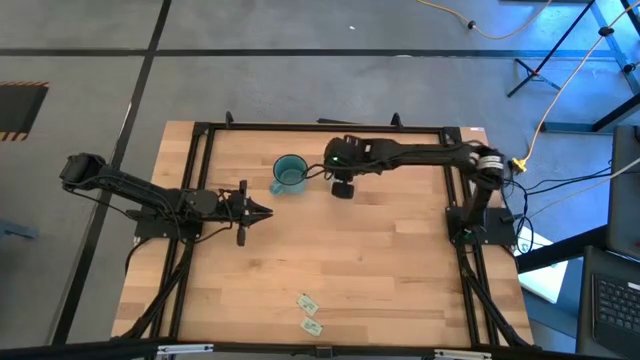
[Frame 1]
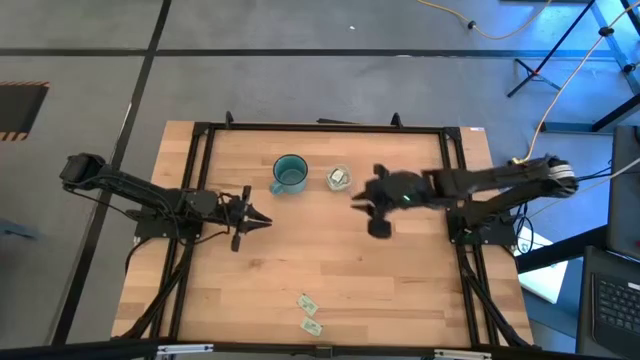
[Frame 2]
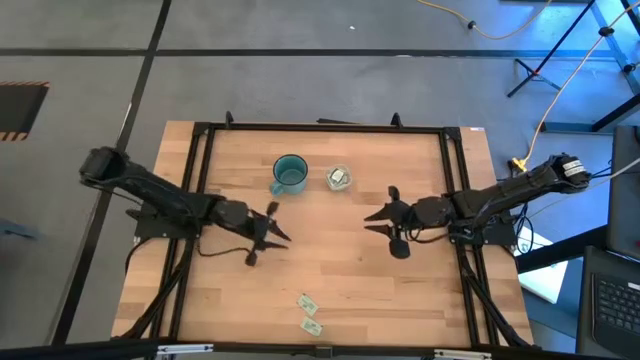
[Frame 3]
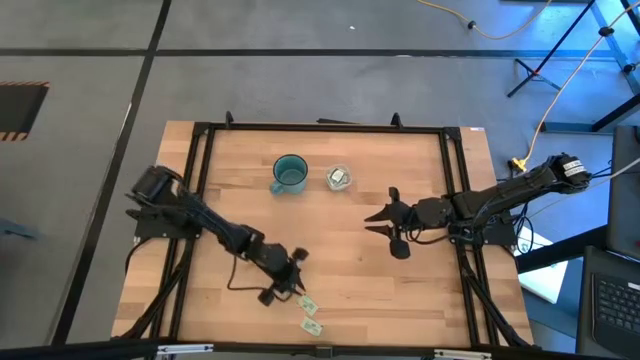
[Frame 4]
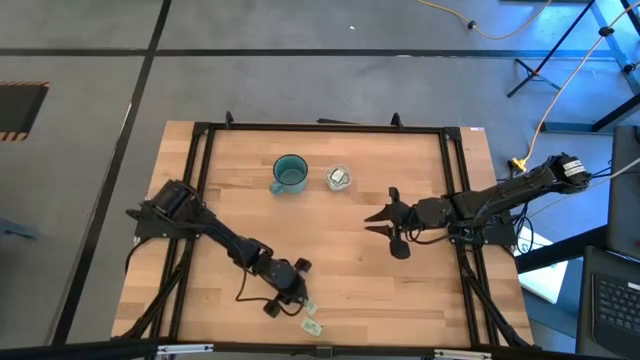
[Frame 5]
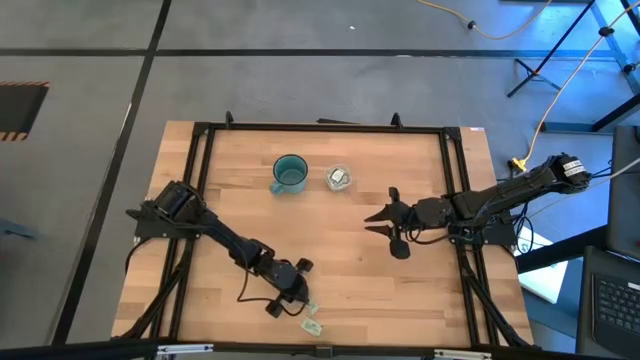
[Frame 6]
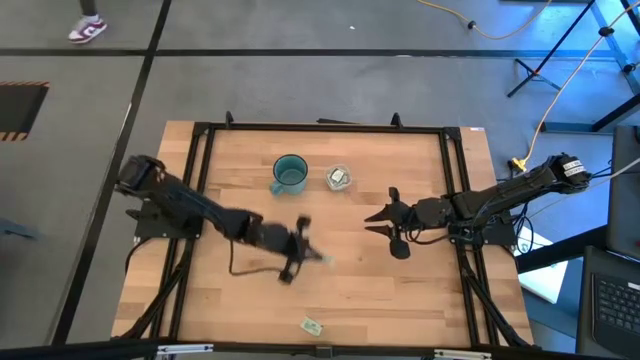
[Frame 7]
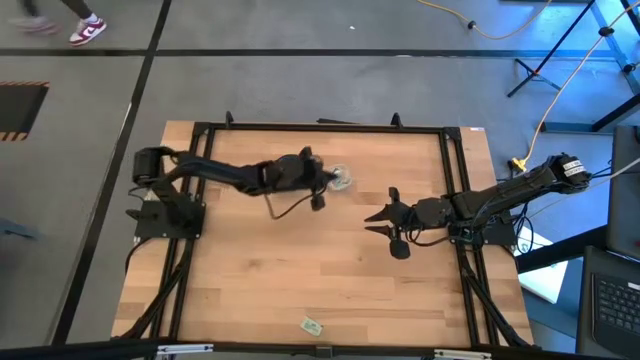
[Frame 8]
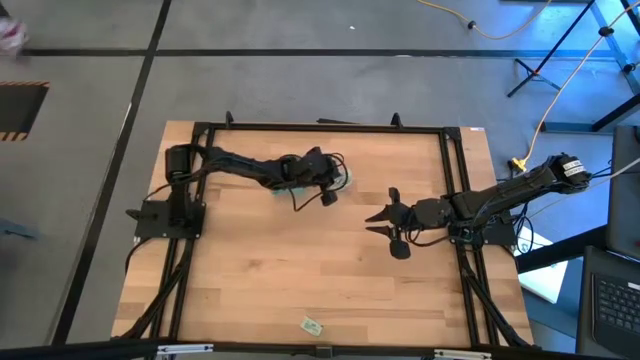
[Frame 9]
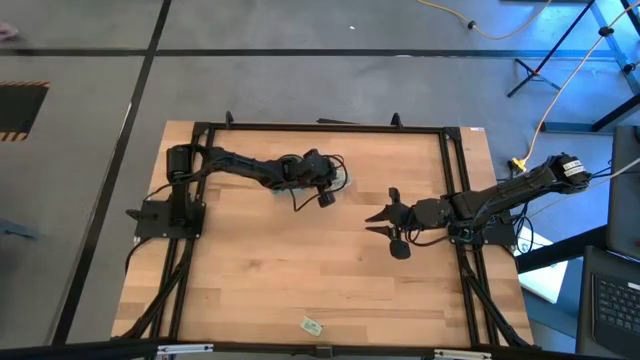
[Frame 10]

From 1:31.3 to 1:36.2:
Task: Pick and place items into bin
Put the white stevia packet into the transparent bin

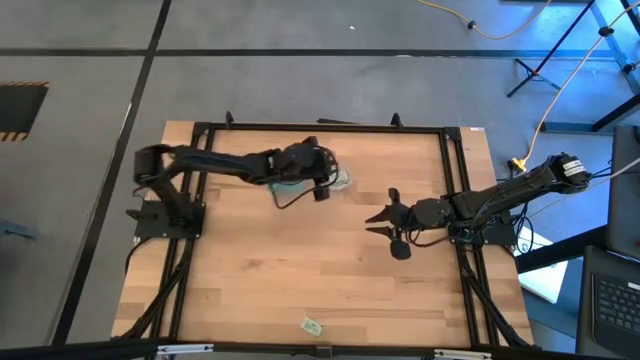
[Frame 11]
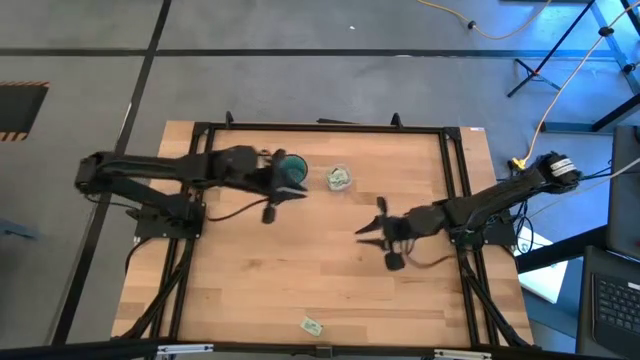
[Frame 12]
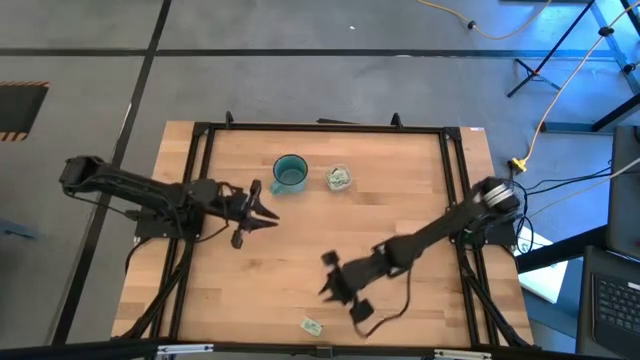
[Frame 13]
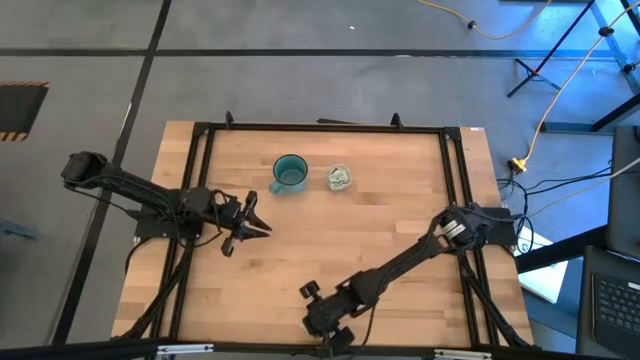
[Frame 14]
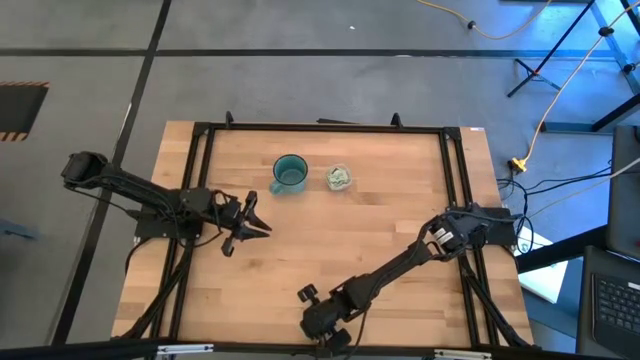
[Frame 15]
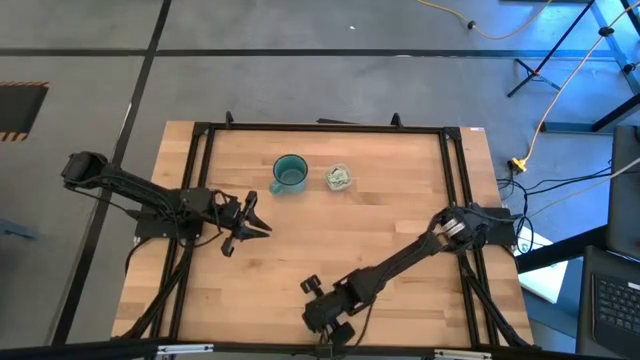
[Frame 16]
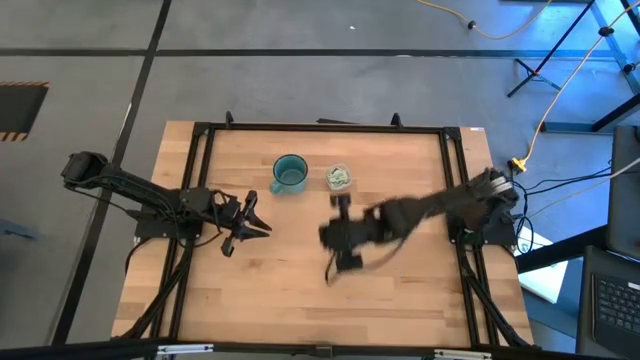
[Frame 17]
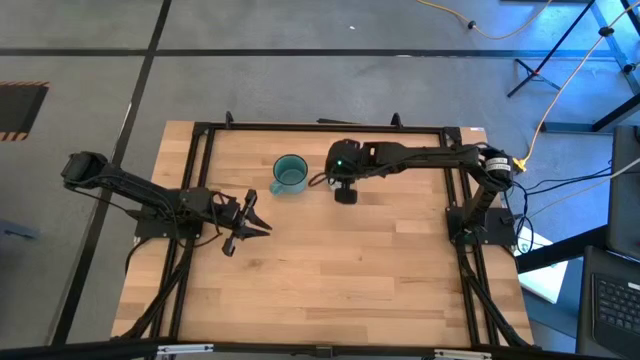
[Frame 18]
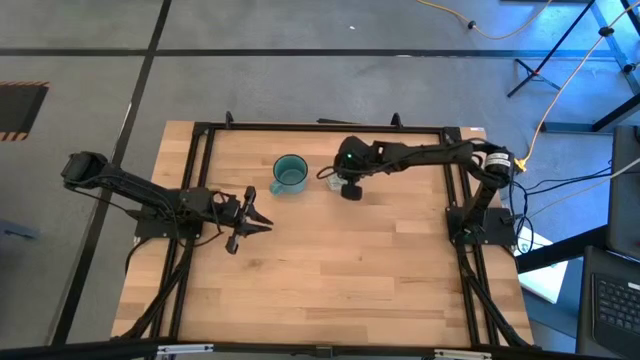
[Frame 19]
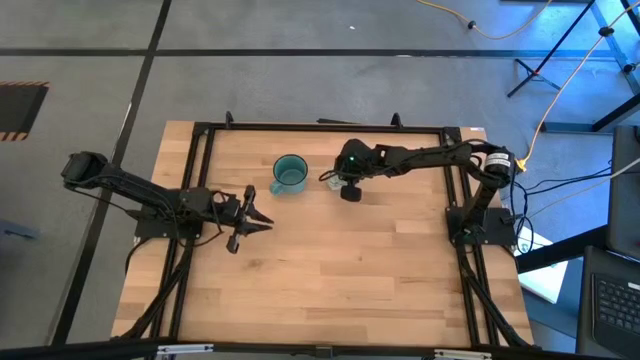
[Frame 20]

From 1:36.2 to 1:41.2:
Put the white stevia packet into the transparent bin

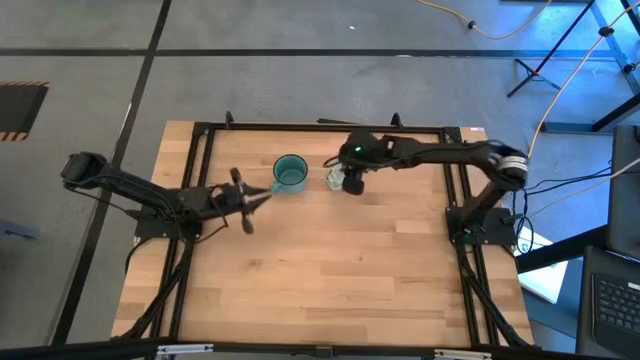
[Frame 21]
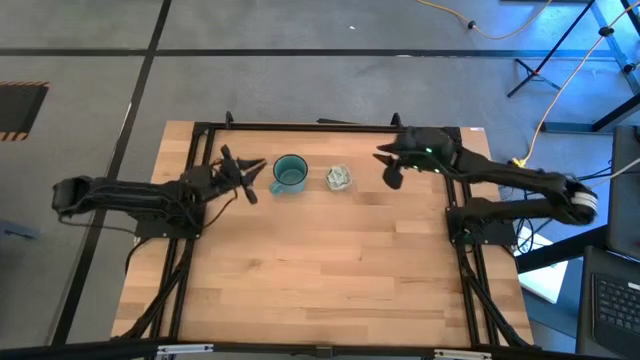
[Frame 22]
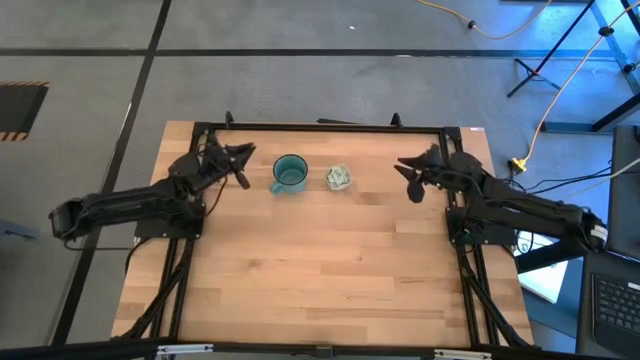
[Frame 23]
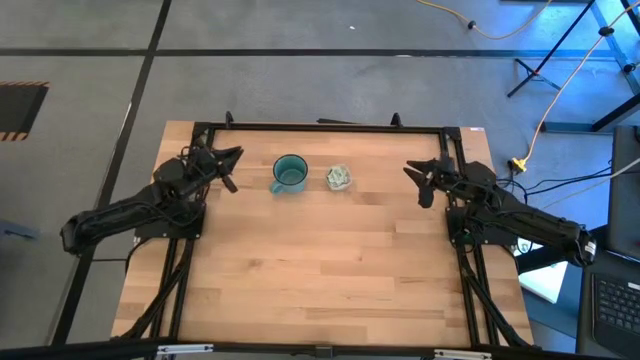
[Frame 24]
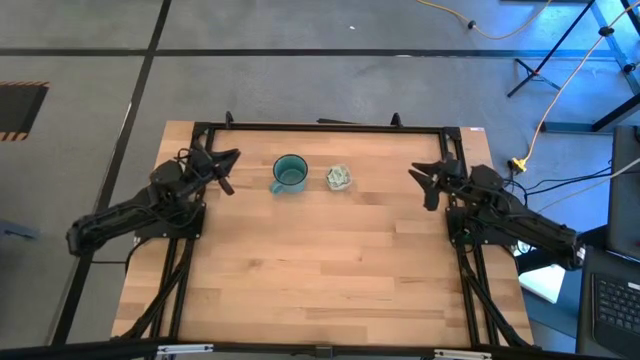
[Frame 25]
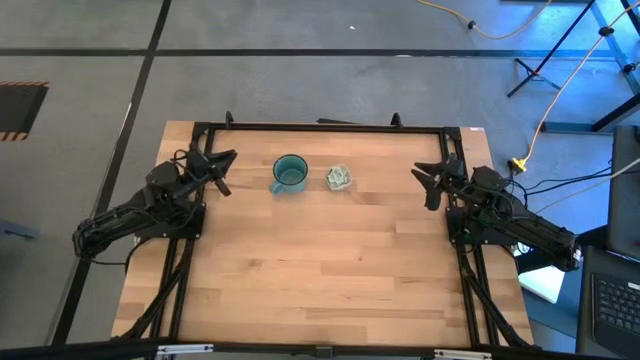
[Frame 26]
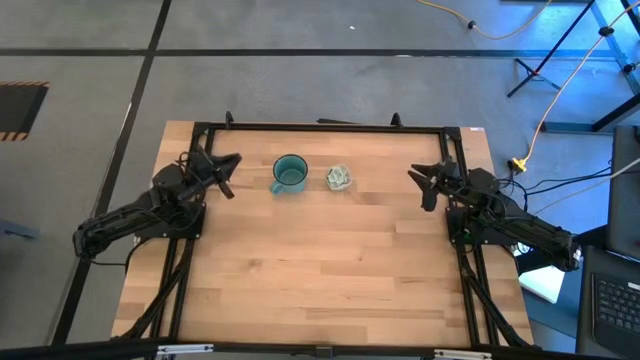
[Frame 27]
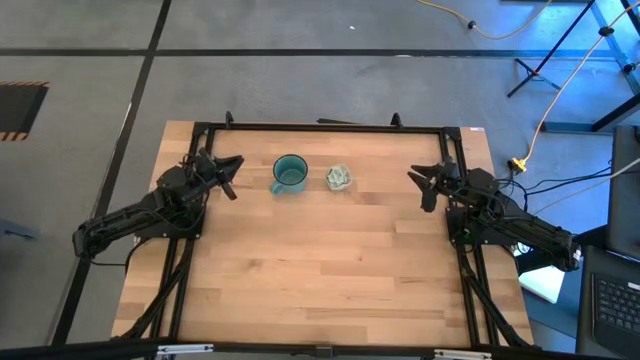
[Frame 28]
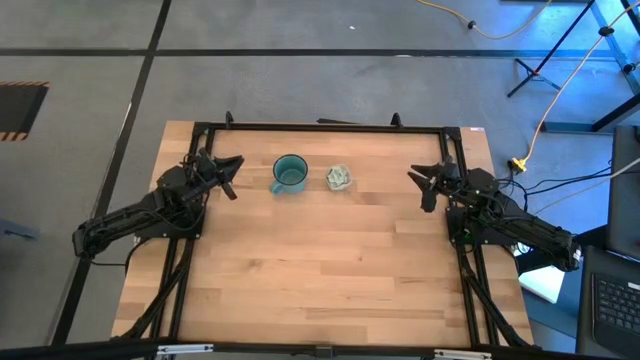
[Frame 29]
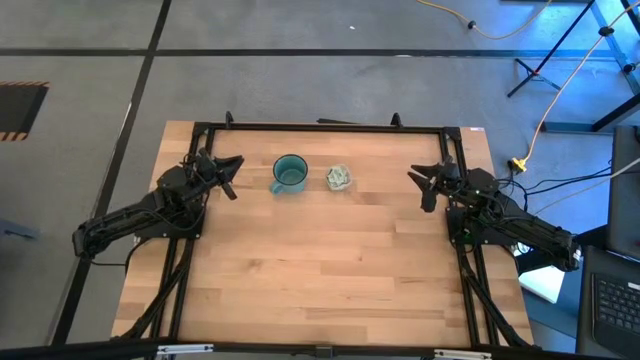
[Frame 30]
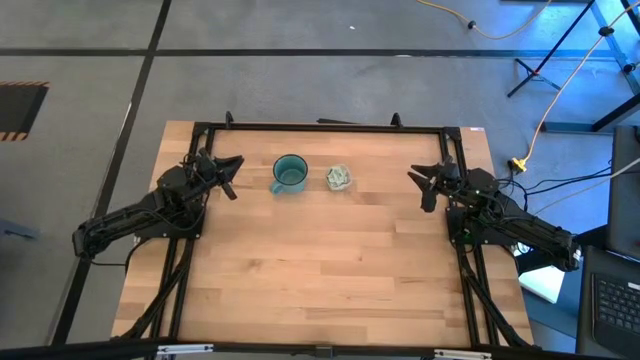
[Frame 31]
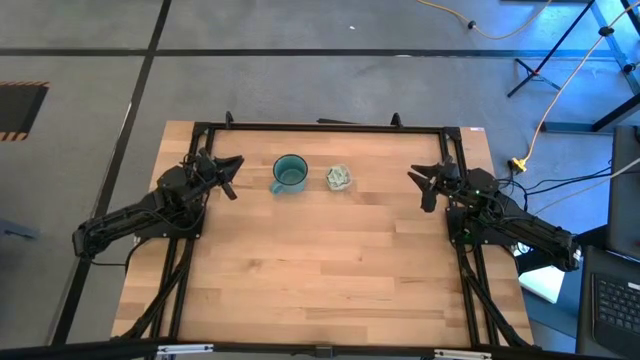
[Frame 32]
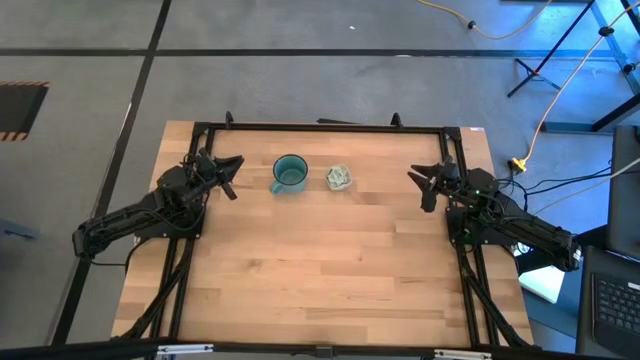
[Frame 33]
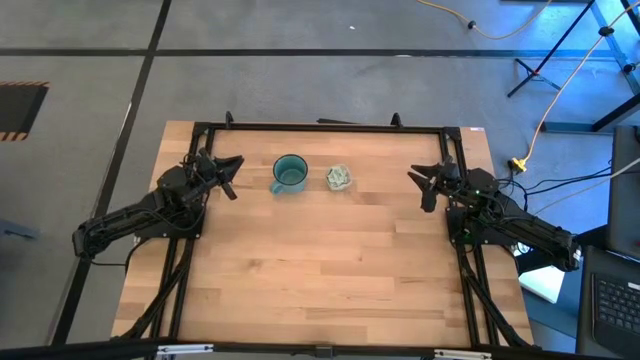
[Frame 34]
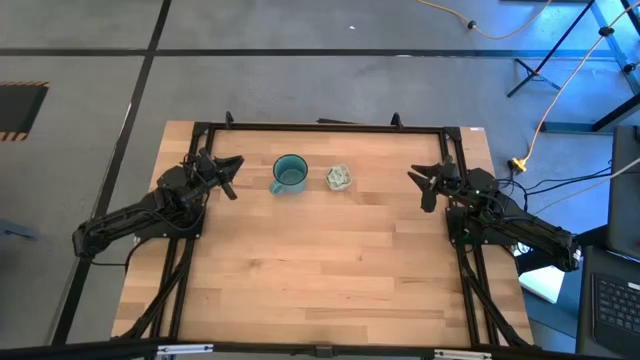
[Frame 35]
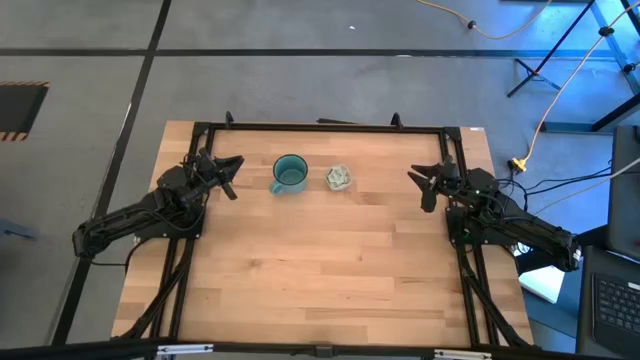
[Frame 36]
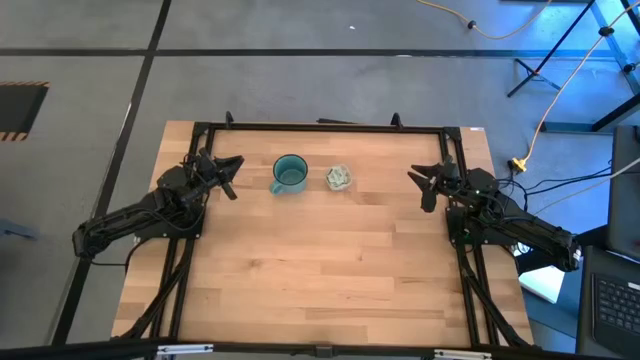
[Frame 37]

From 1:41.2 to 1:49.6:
Return to Home Position
